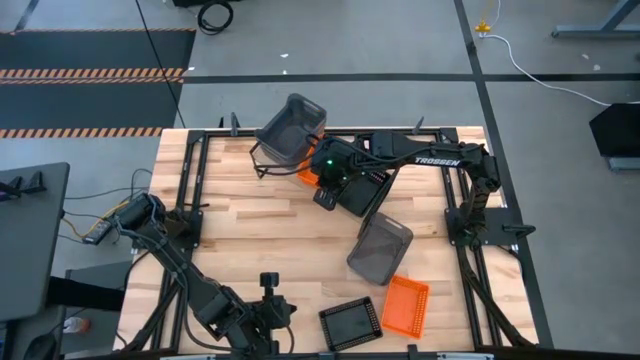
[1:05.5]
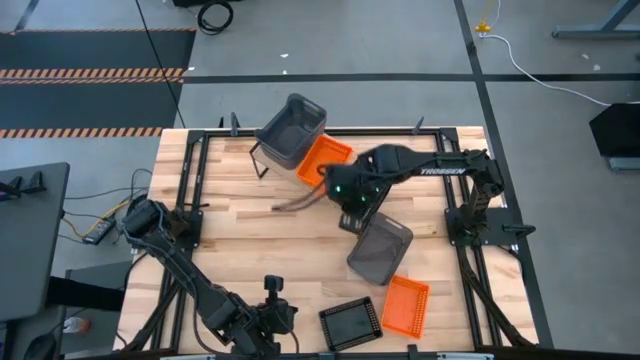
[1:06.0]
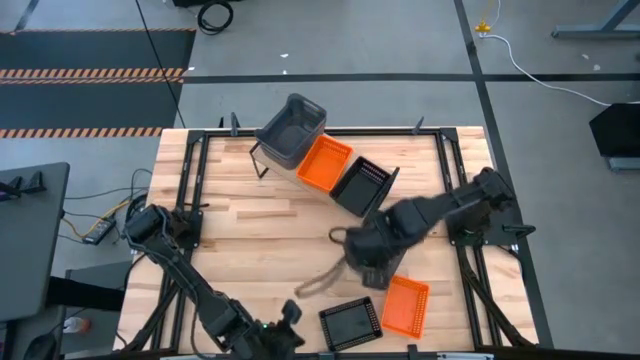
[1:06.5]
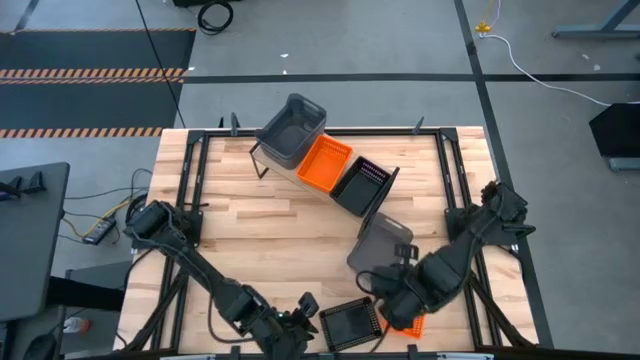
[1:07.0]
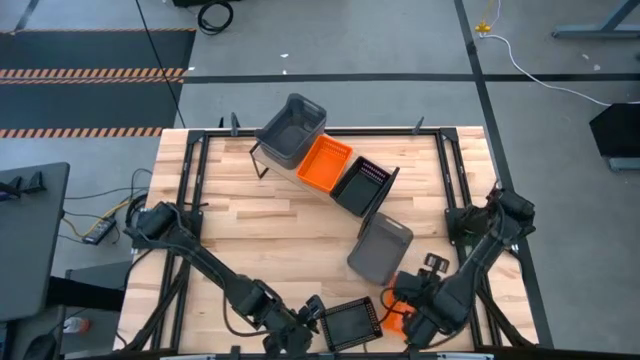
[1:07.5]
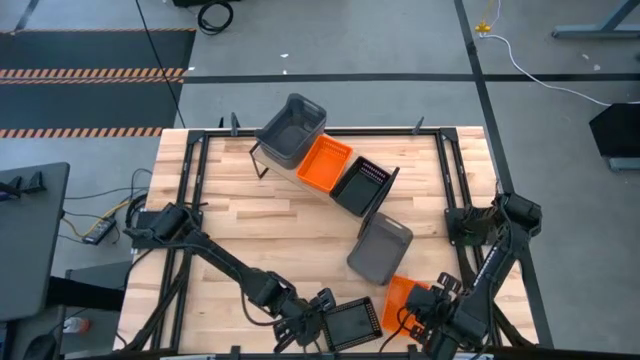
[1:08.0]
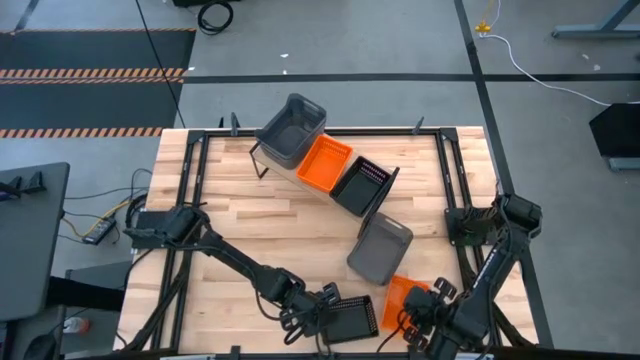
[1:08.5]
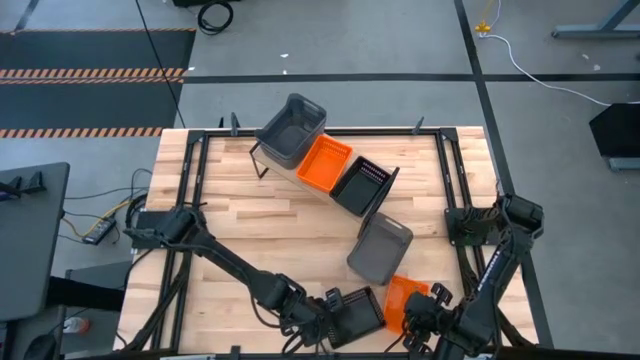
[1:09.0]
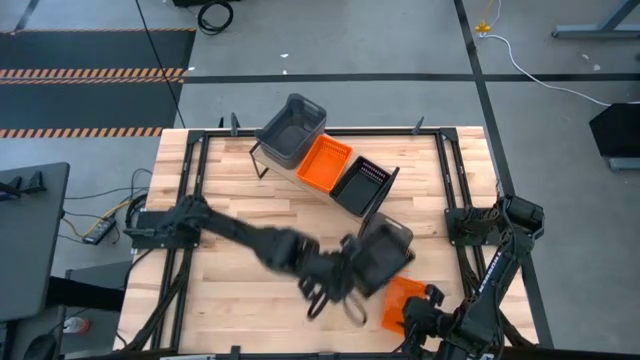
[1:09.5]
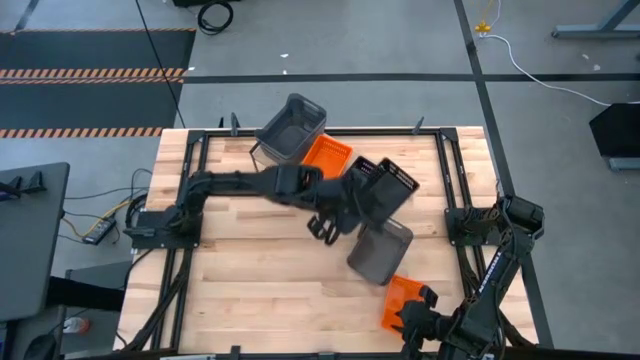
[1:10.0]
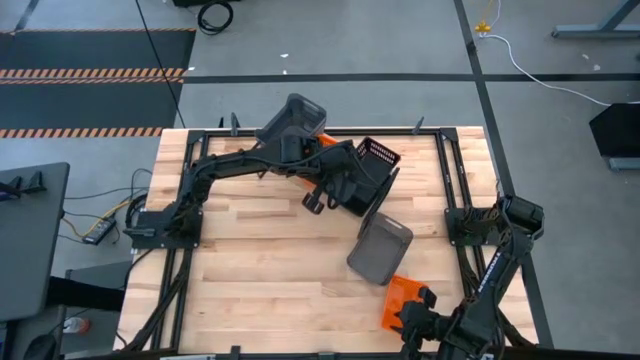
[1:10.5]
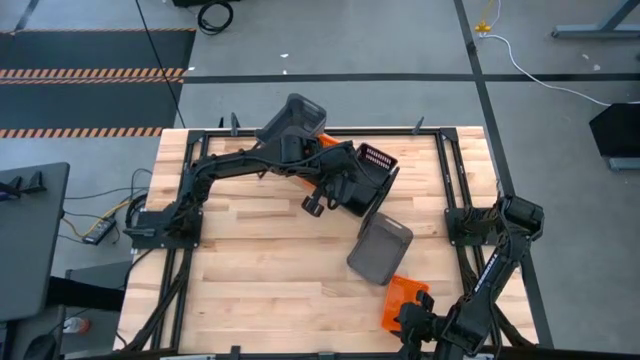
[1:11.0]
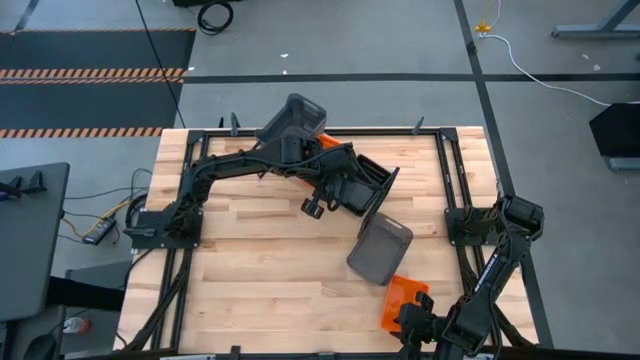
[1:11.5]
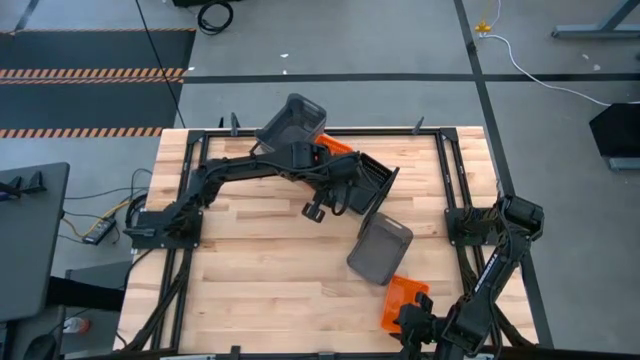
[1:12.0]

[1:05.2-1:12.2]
Task: Stack baskets on shelf by color
Stack the black basket on top of the other black baskets on the shelf

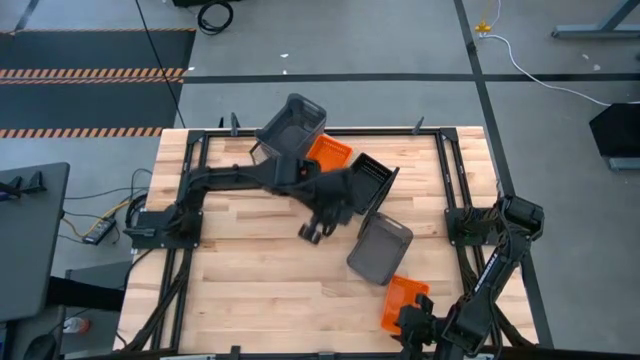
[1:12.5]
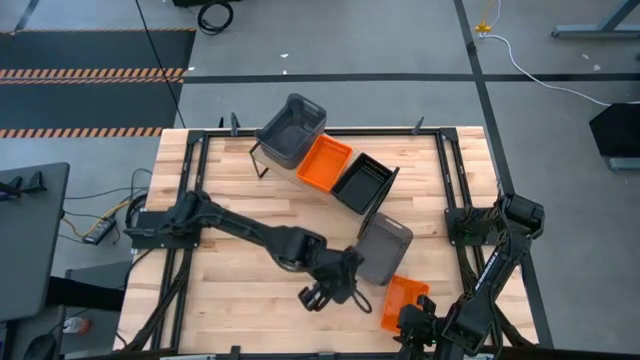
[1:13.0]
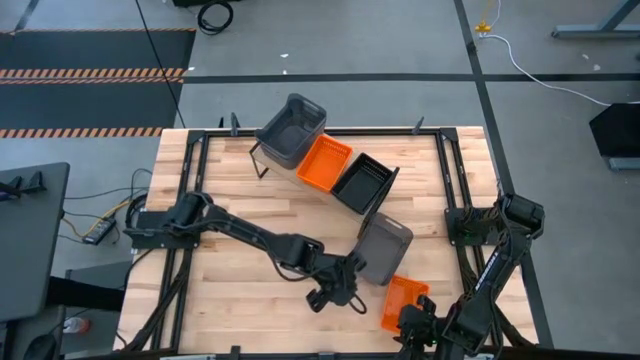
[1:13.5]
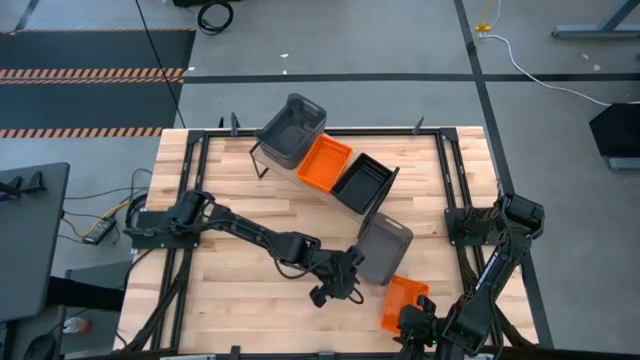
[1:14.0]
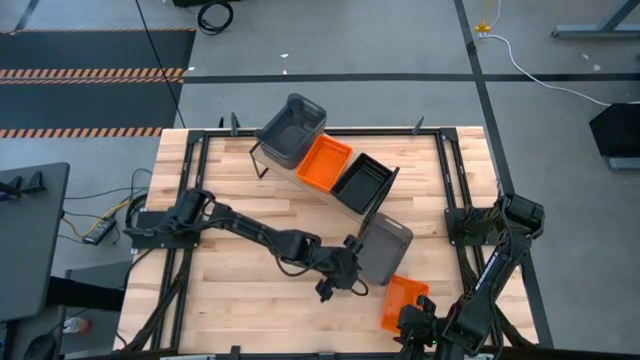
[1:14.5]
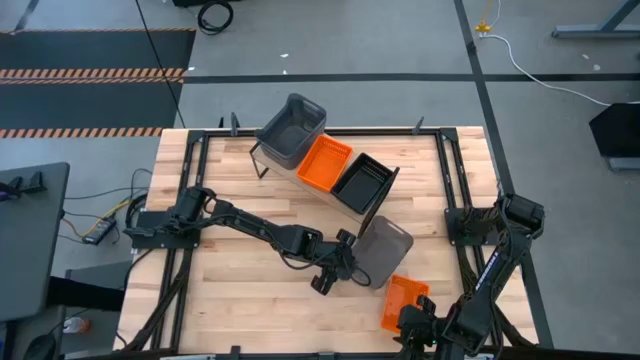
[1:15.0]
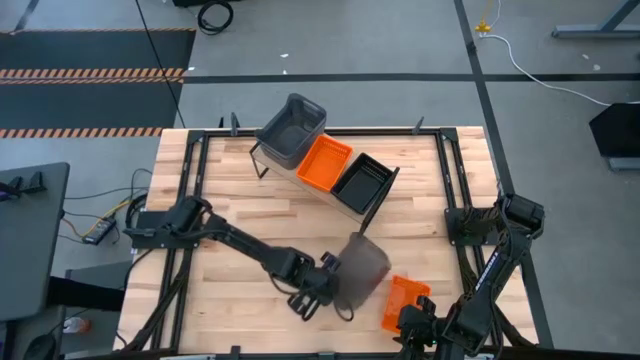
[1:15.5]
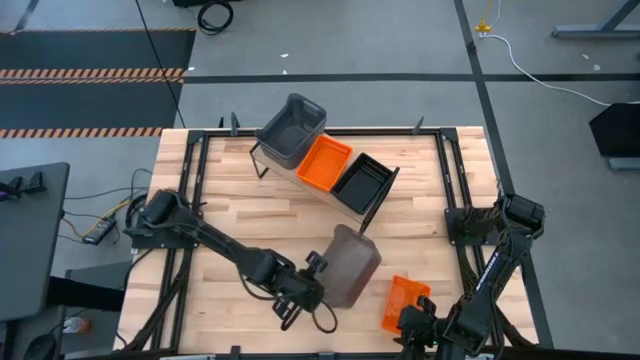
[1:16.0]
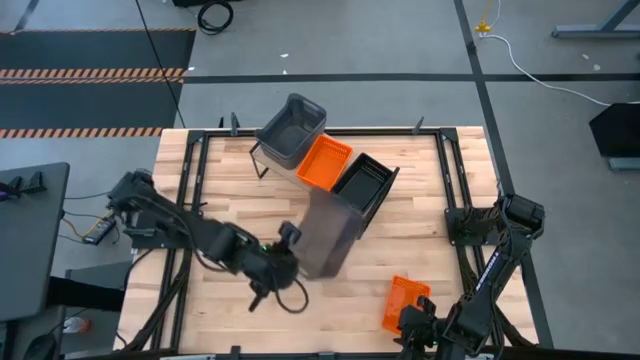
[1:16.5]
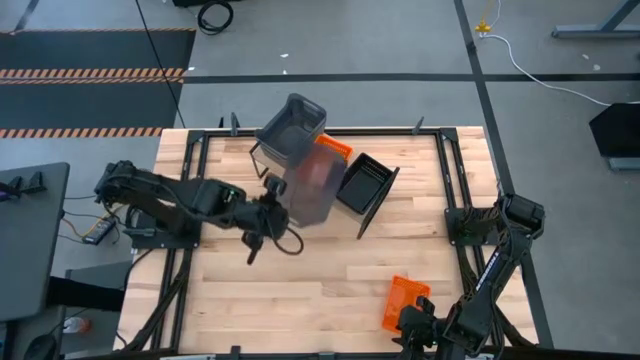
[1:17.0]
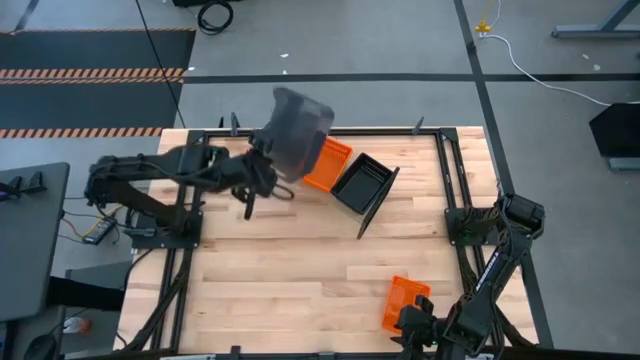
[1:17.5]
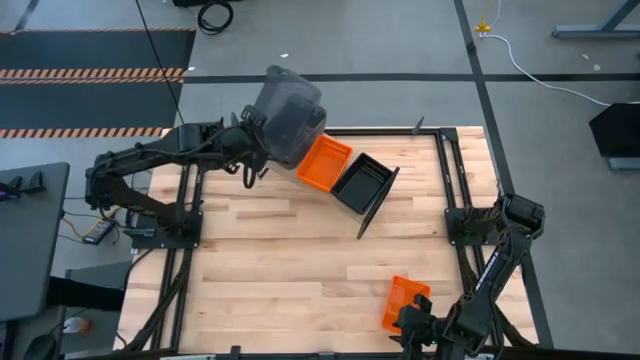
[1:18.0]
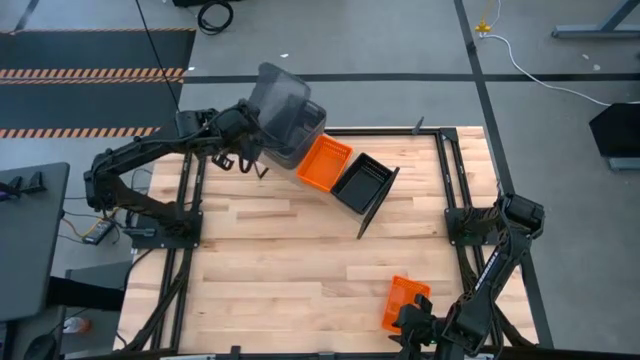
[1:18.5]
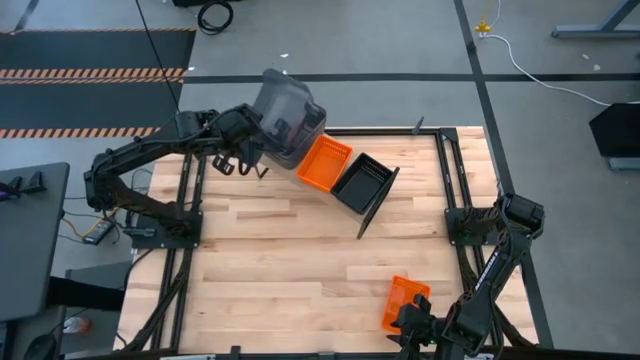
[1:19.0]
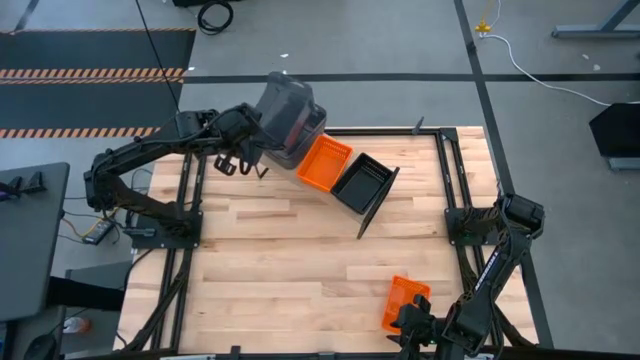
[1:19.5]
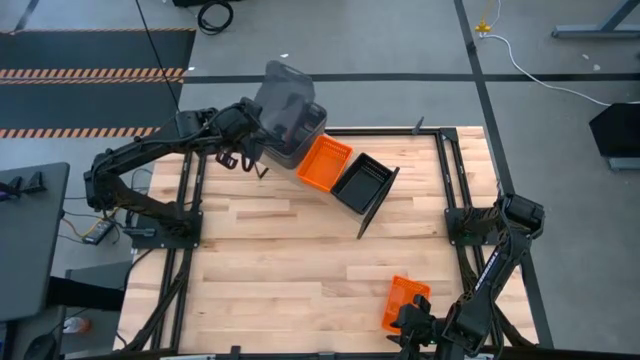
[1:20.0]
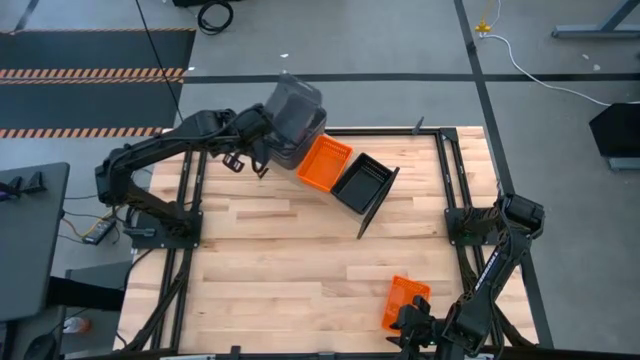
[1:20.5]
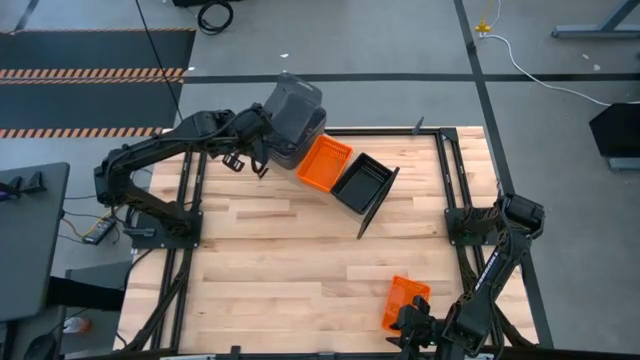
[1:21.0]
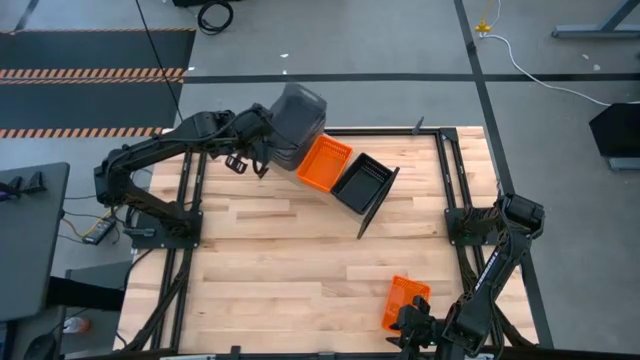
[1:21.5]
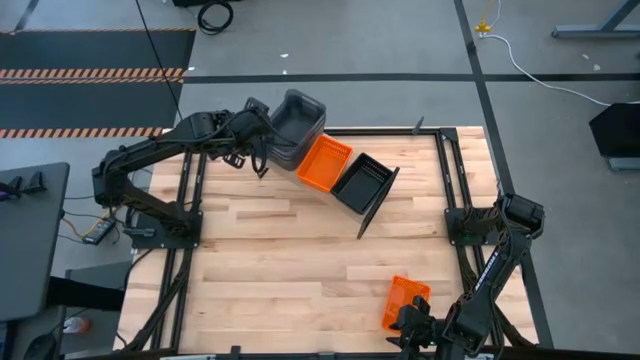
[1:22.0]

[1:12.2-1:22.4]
Stack the black bin on top of the other black bins on the shelf

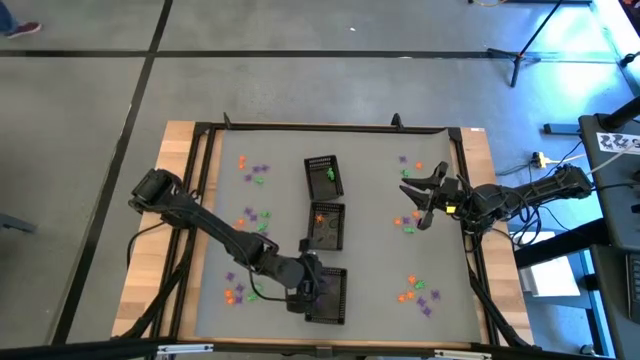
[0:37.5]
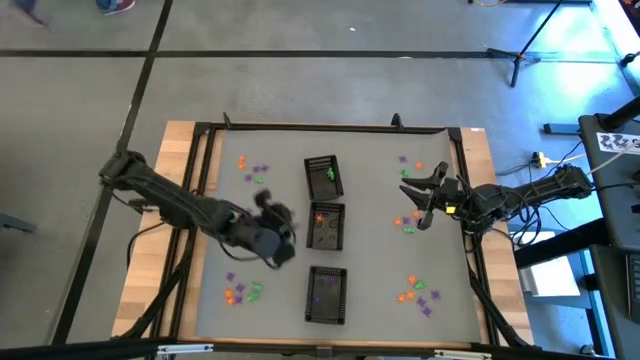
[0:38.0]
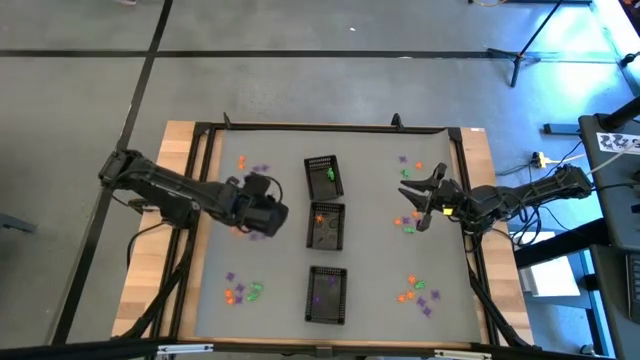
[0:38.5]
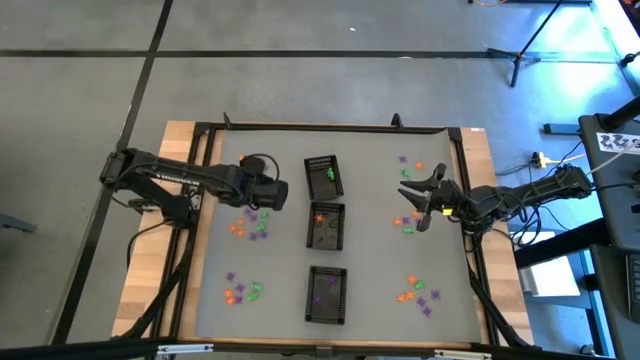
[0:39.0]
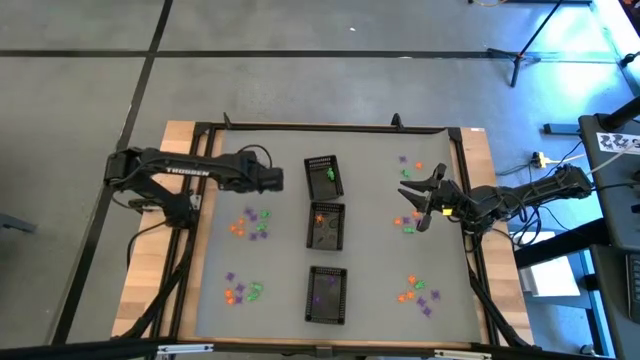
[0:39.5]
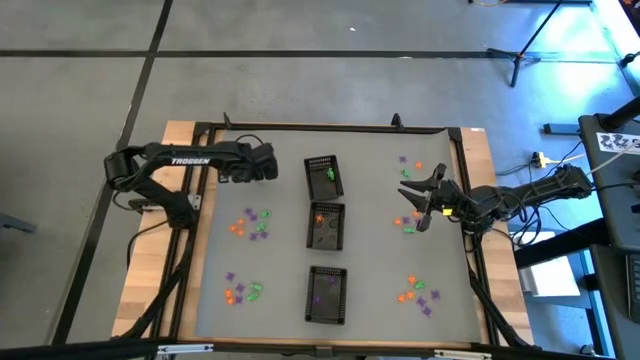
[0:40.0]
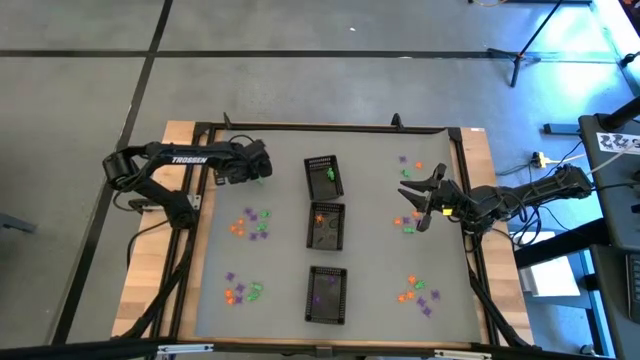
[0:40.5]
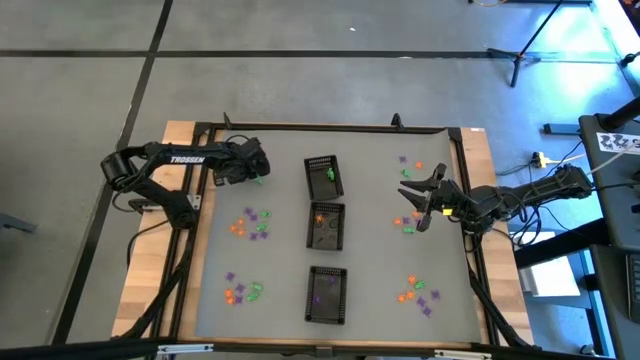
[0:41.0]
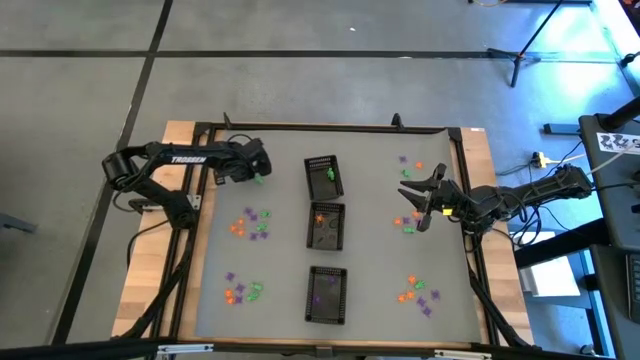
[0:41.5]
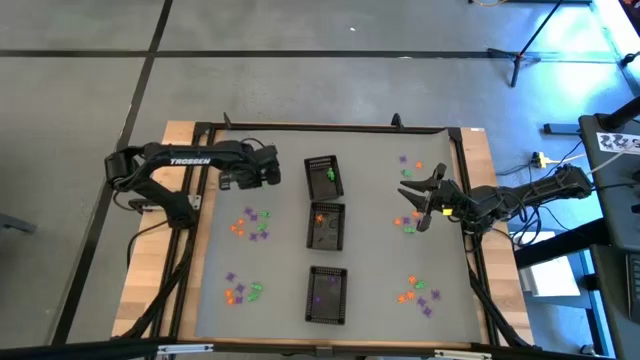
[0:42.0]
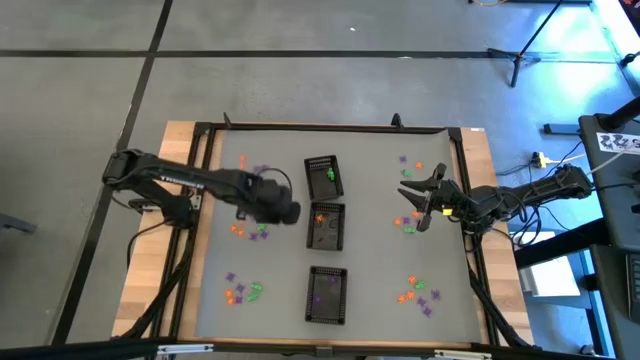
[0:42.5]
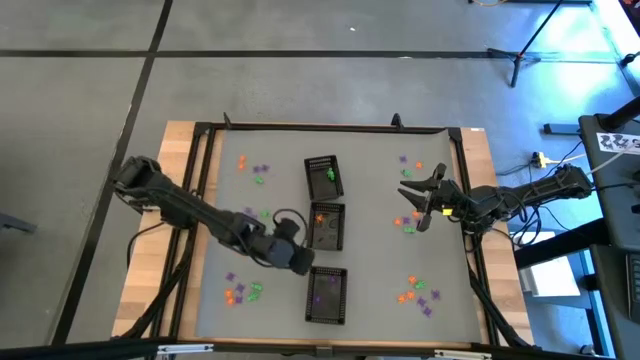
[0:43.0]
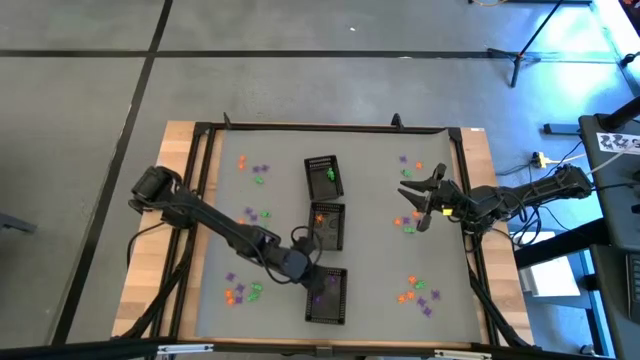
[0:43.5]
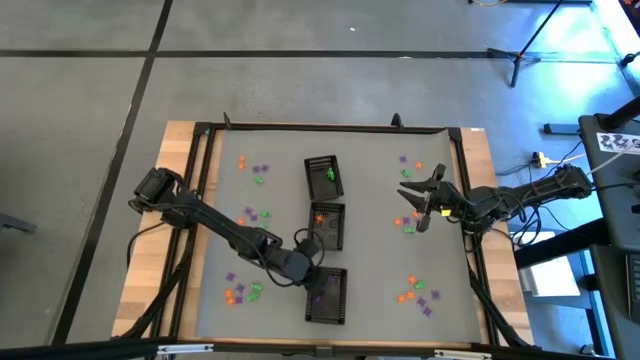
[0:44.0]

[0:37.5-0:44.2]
Task: Sort Halloween decoration
Put the violet spider toy into the bottom black bin
